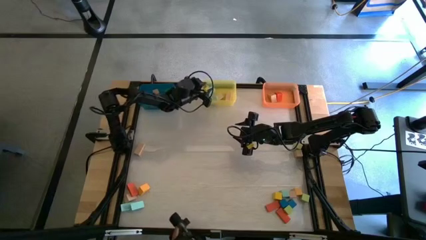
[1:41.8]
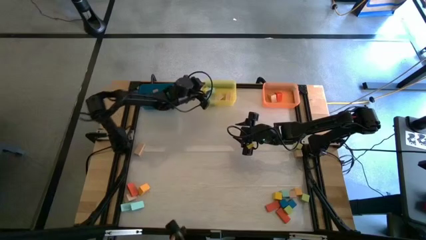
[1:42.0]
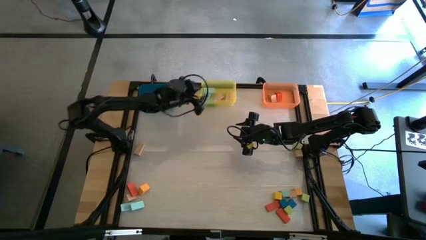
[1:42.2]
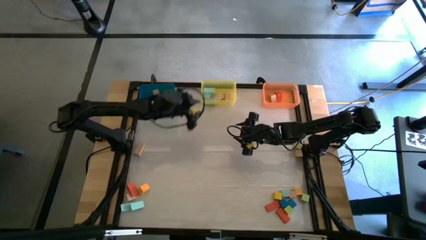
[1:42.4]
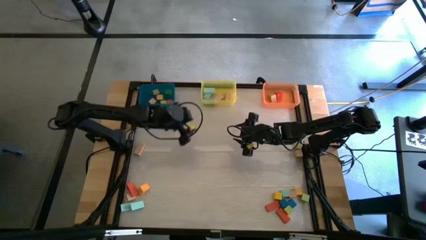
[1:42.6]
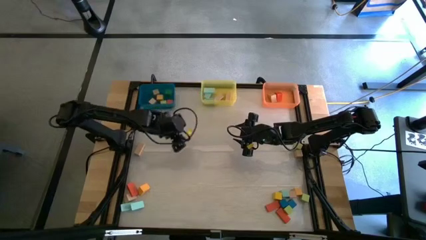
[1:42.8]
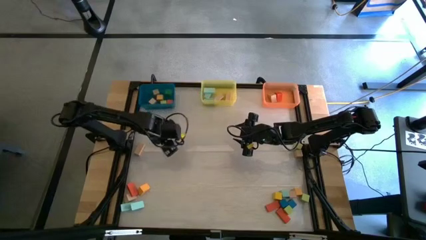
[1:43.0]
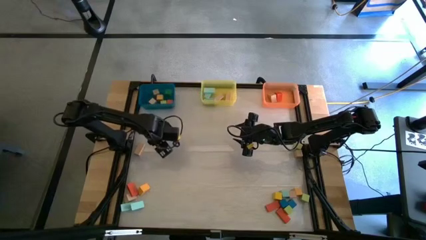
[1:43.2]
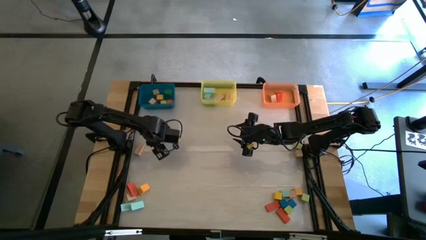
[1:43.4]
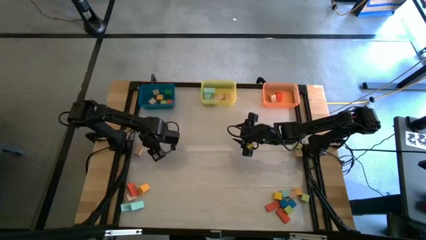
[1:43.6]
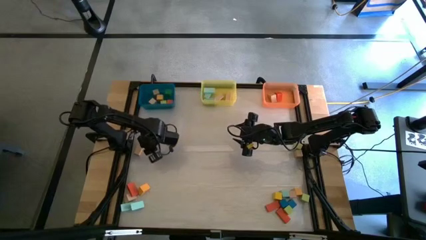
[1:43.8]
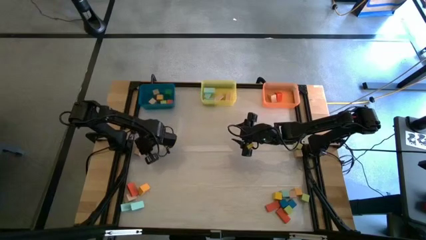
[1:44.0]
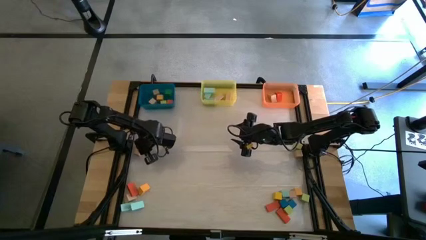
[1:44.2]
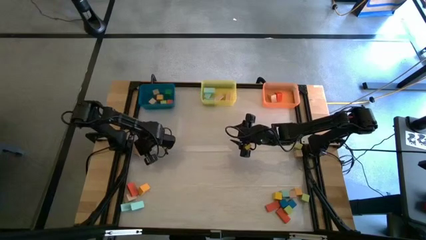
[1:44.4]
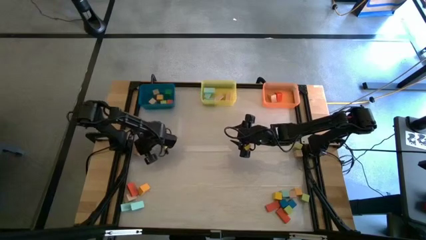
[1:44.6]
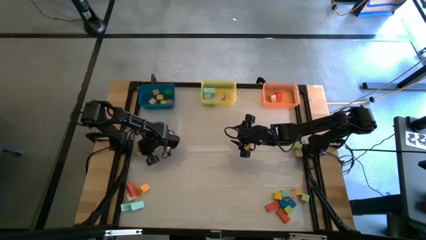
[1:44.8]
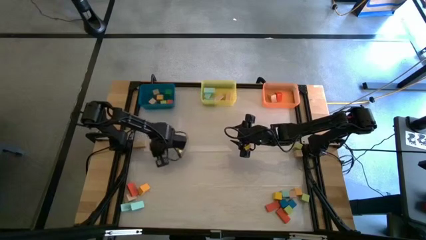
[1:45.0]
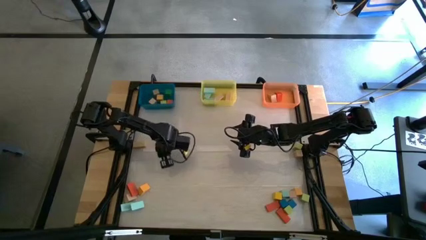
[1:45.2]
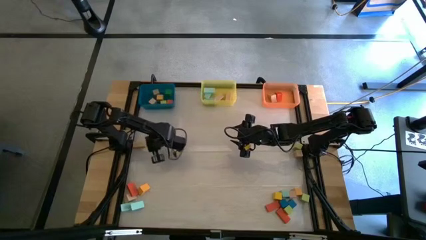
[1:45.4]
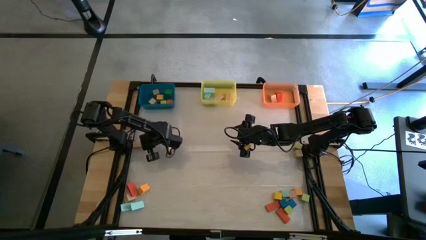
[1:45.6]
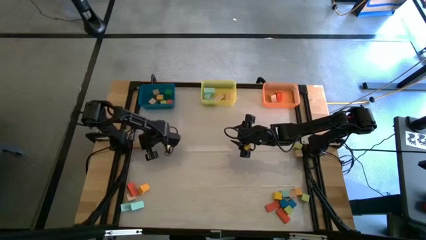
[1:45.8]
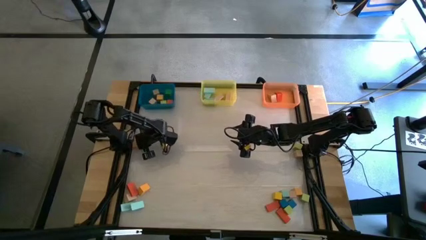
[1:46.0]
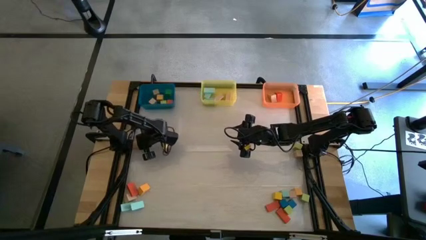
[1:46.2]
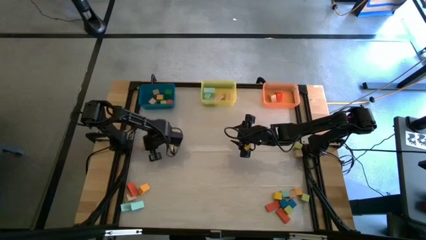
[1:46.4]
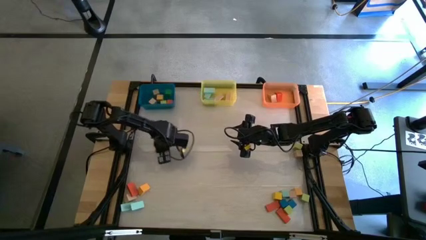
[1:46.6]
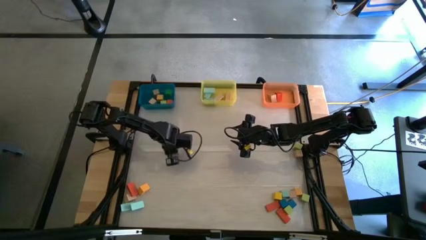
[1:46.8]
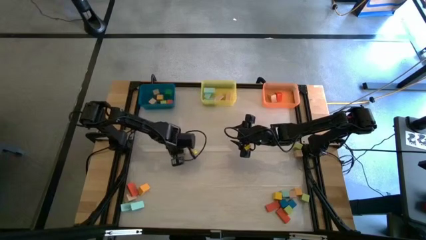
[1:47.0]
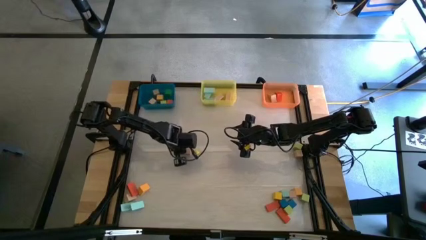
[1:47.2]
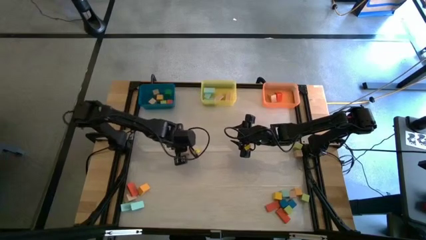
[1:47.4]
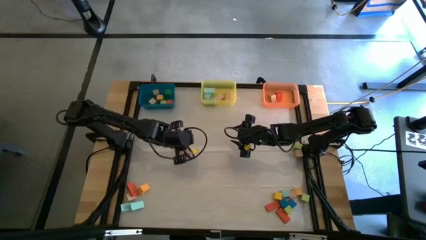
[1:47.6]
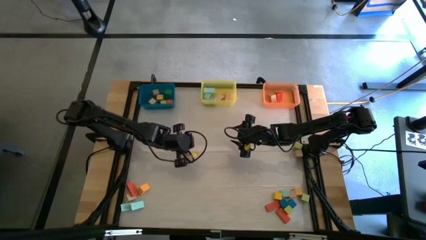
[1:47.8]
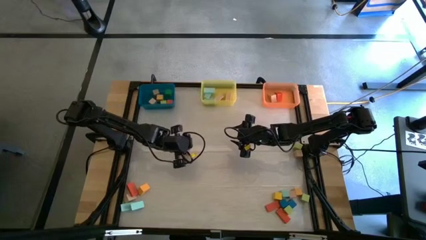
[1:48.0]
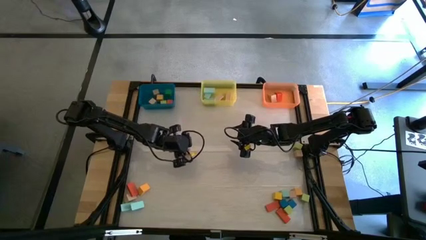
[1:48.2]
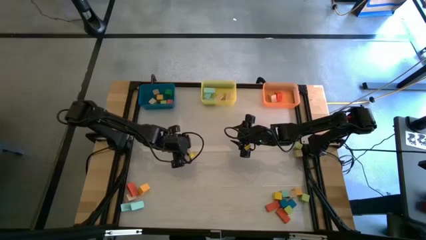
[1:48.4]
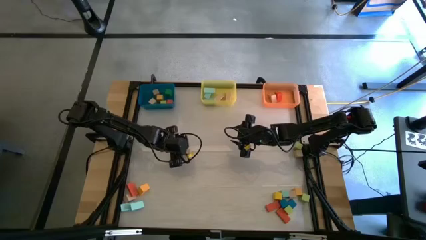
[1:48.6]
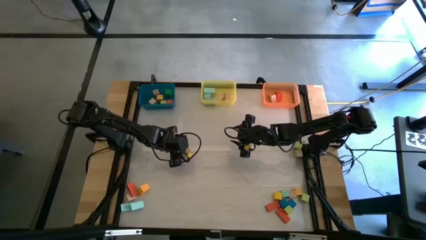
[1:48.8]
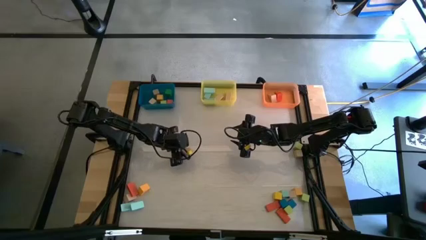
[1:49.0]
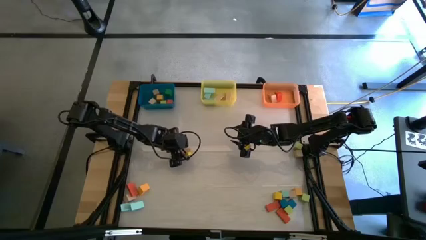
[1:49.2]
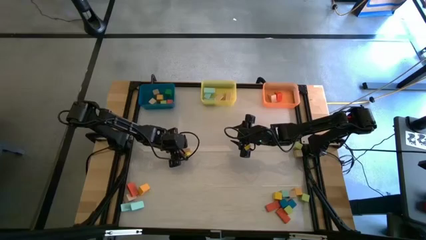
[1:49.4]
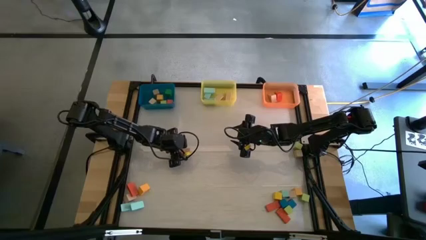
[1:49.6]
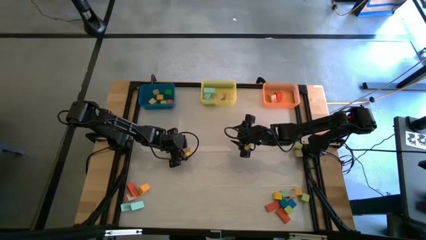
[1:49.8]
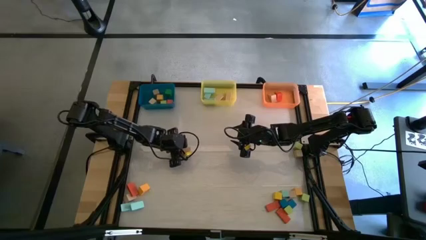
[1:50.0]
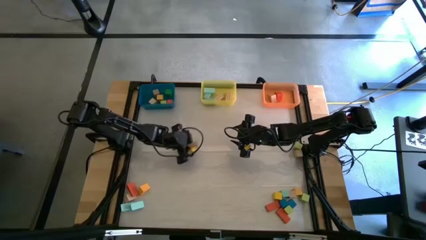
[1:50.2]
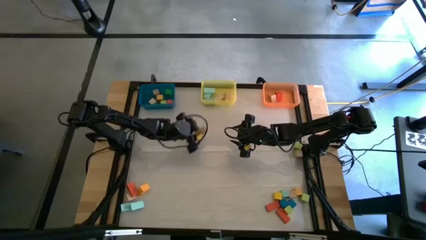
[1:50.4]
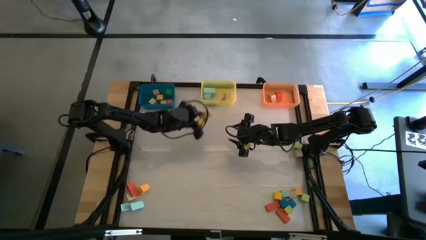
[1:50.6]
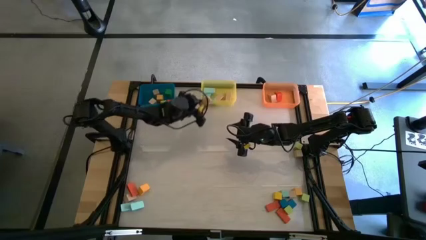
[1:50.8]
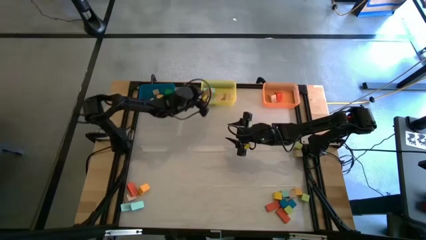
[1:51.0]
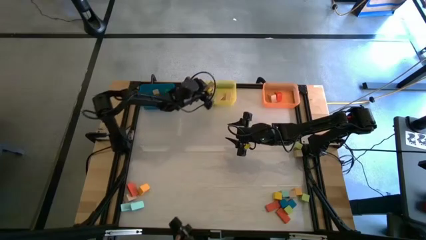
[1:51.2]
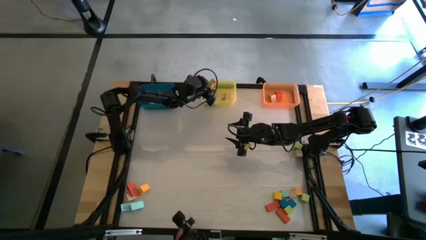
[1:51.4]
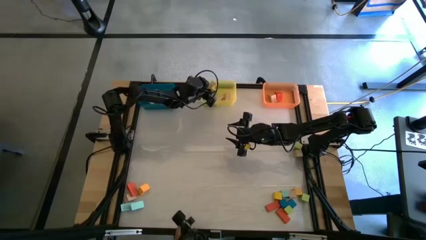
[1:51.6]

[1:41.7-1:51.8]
Task: Sort blocks by size
Put the brown rectangle block into the yellow bin

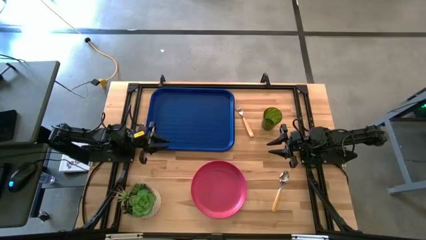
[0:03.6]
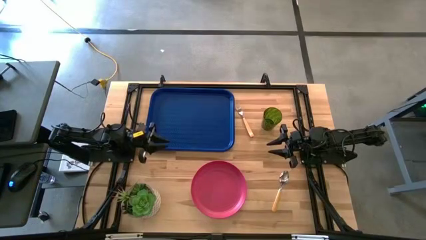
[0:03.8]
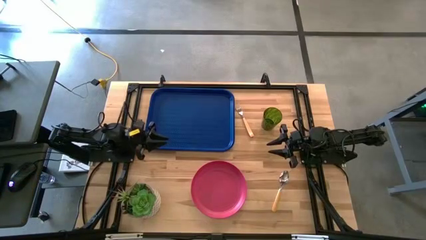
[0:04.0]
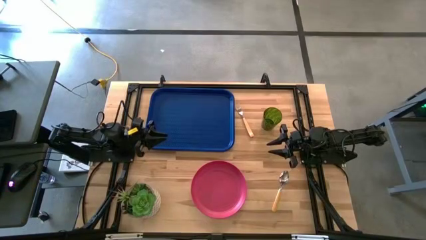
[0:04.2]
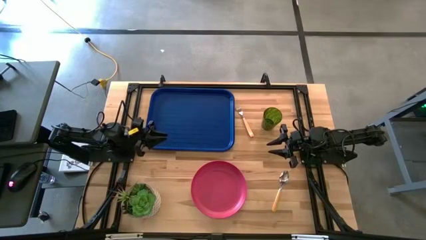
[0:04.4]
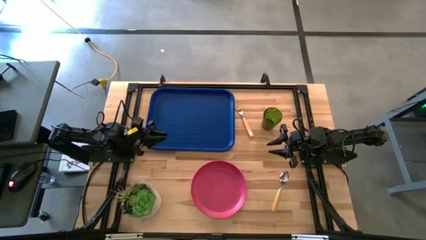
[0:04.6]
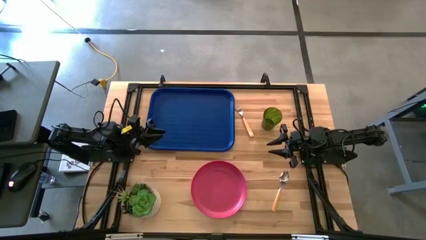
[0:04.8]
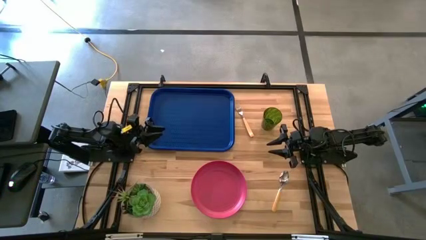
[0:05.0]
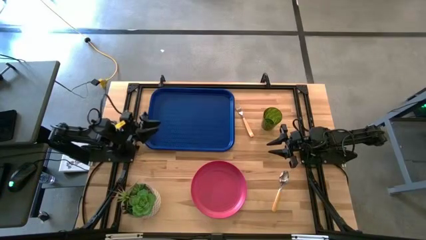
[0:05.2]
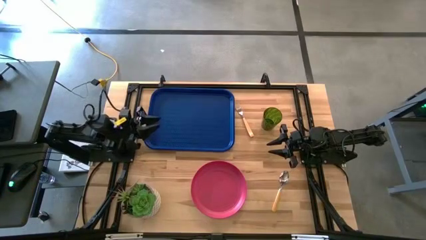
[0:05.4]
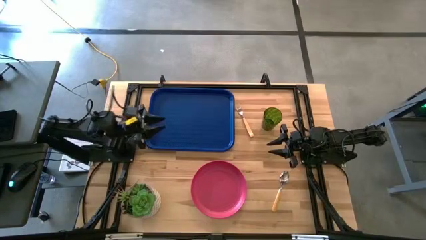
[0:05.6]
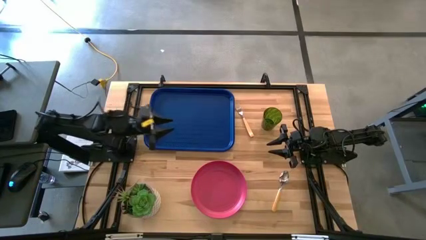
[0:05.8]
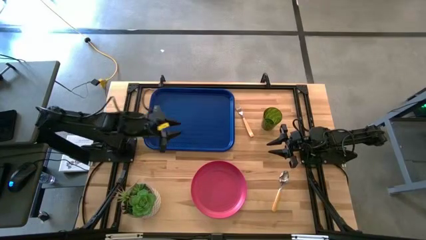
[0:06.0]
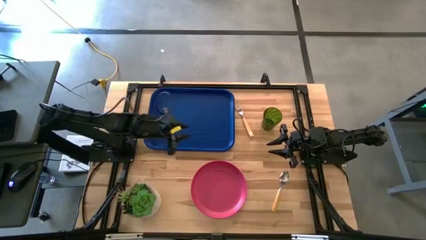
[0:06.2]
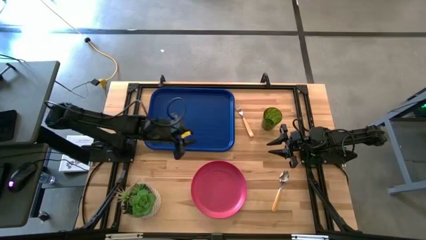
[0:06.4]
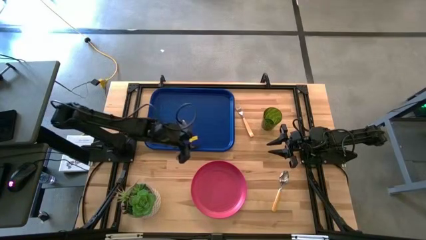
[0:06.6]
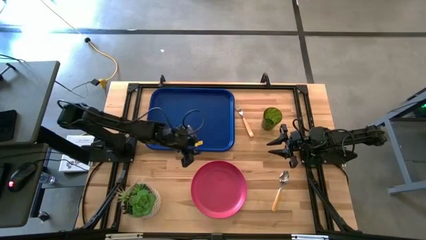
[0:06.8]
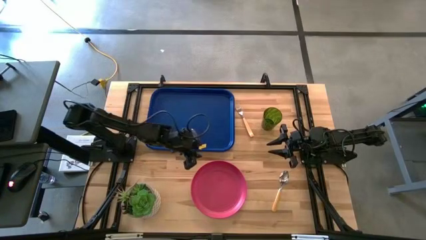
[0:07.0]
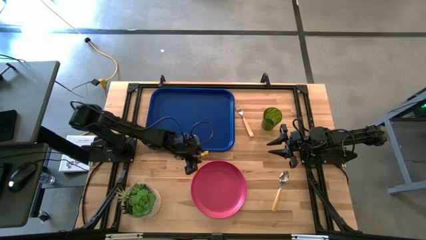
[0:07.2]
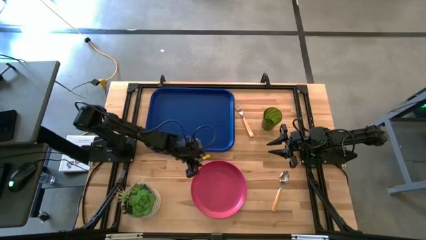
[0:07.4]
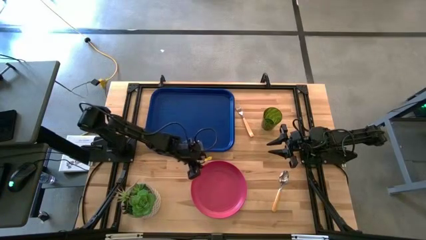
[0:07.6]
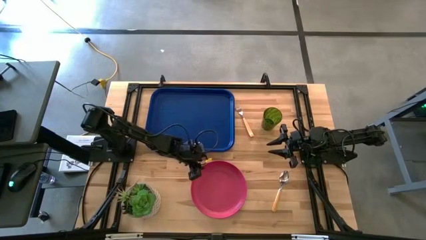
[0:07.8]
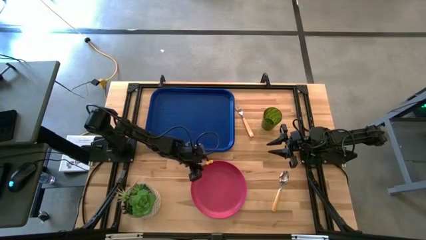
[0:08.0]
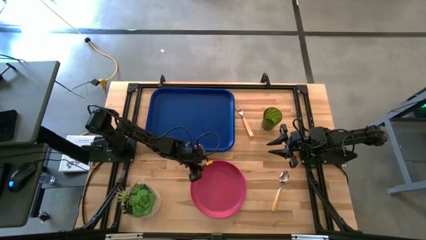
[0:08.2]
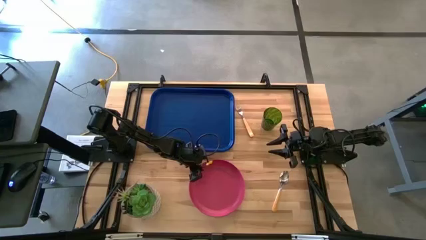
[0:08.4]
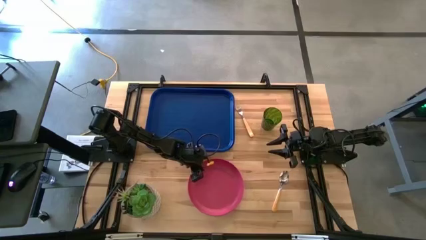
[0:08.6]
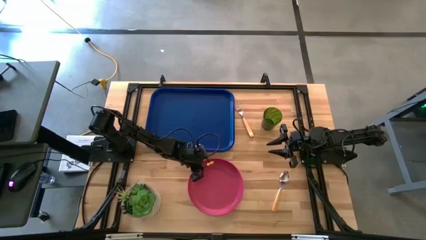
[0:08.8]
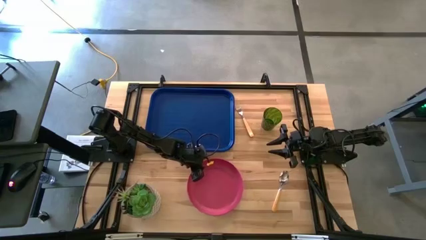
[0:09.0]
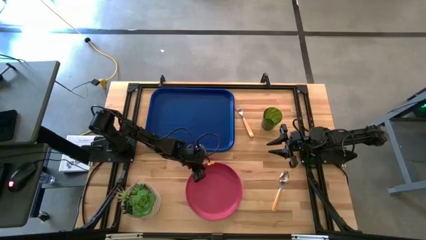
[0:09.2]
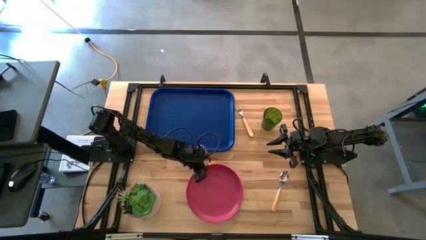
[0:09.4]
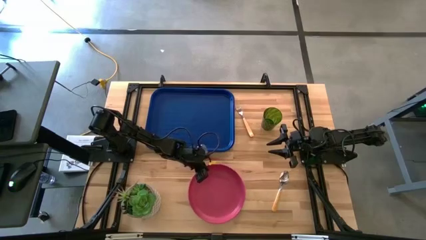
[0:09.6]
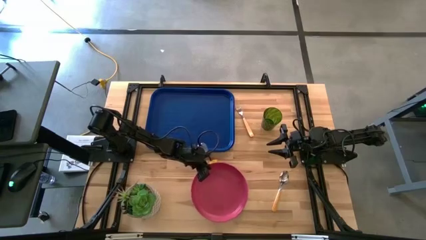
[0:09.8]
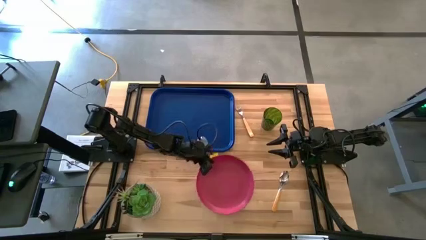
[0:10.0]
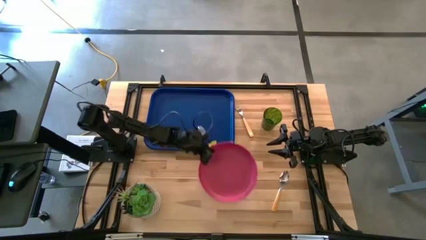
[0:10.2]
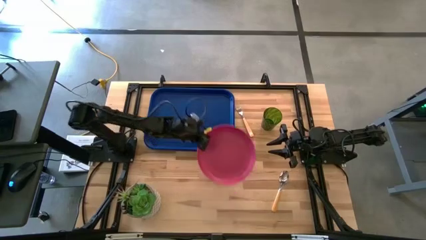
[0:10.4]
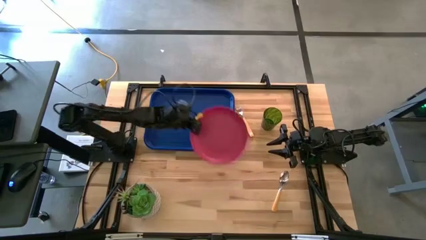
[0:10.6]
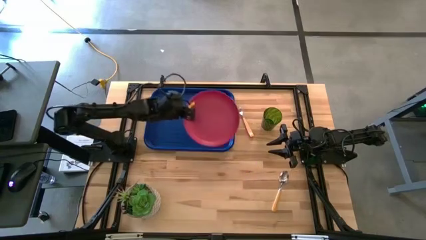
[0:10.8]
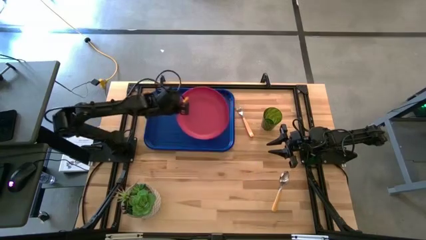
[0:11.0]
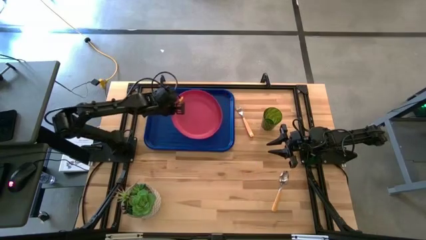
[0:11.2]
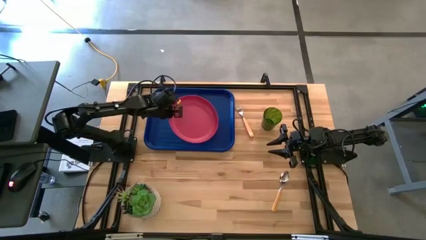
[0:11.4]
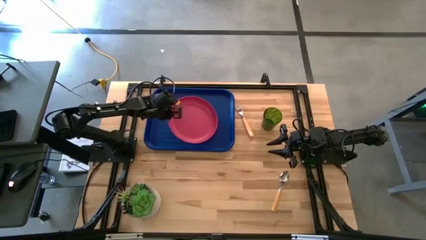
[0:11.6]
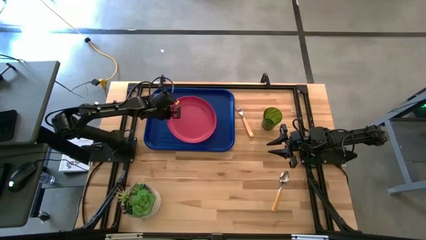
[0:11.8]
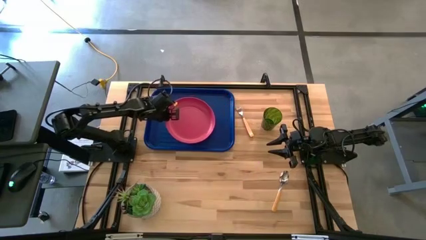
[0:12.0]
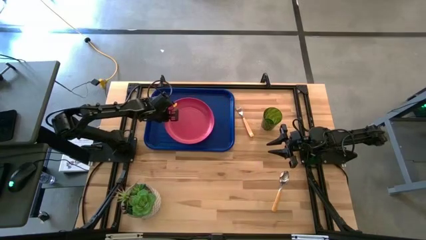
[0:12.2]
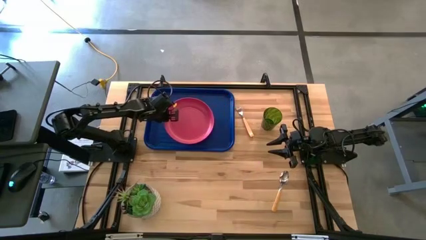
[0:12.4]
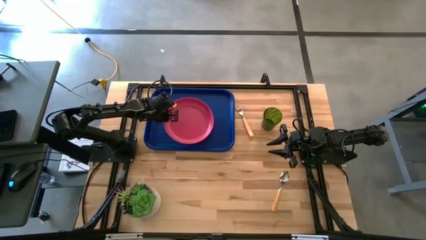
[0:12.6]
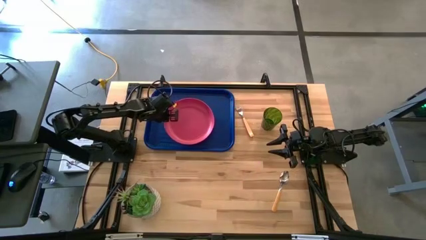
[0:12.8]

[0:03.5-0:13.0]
Task: Pick and place plate/cup/fork/spoon on tray
Put the pink plate on the blue serving tray
